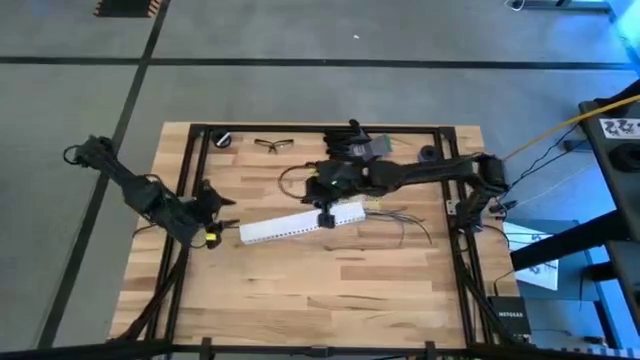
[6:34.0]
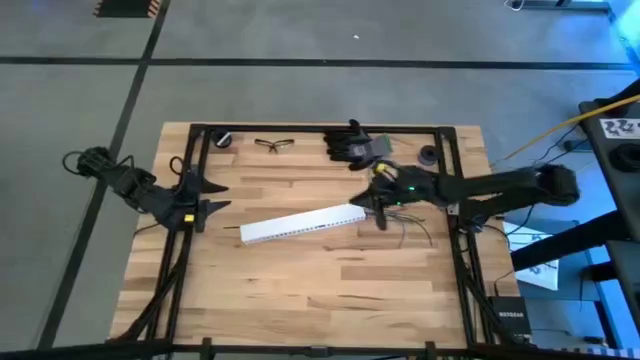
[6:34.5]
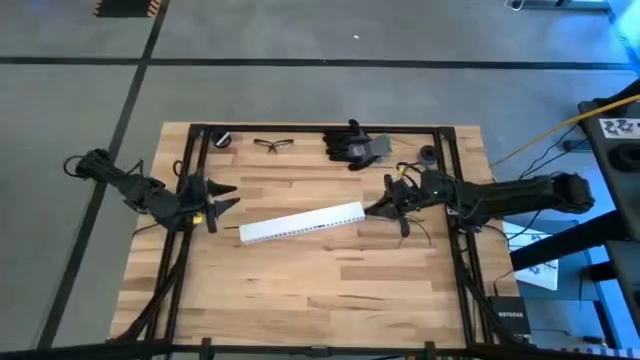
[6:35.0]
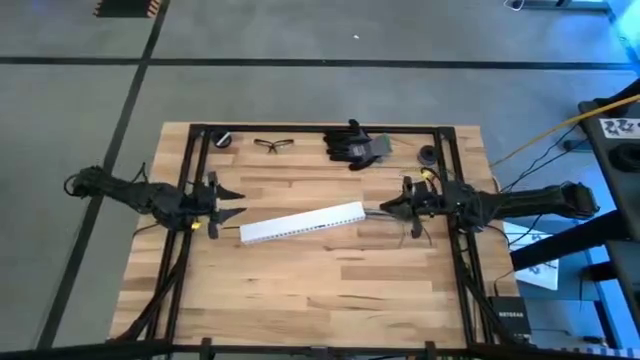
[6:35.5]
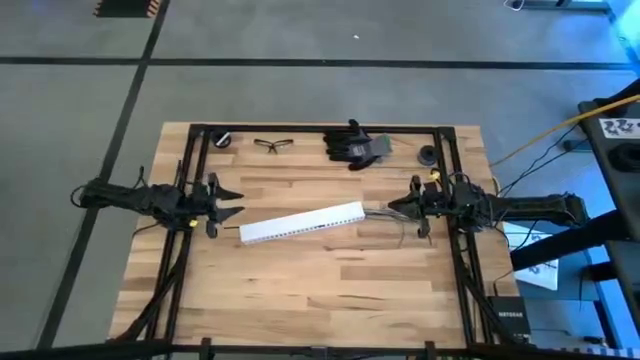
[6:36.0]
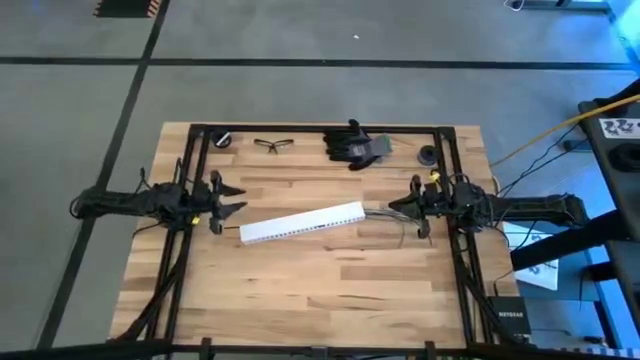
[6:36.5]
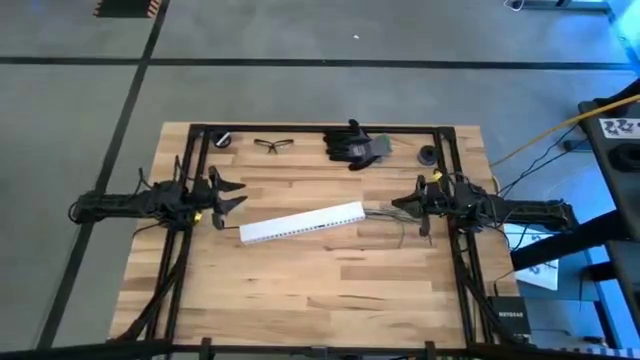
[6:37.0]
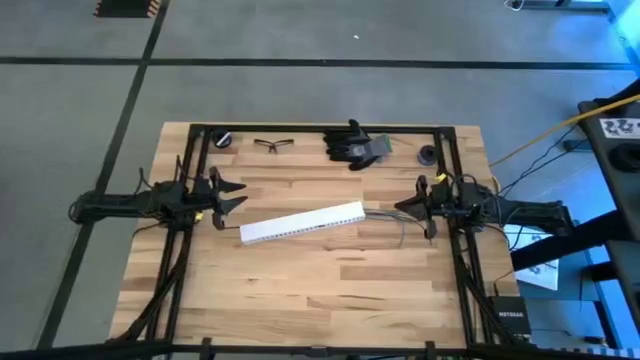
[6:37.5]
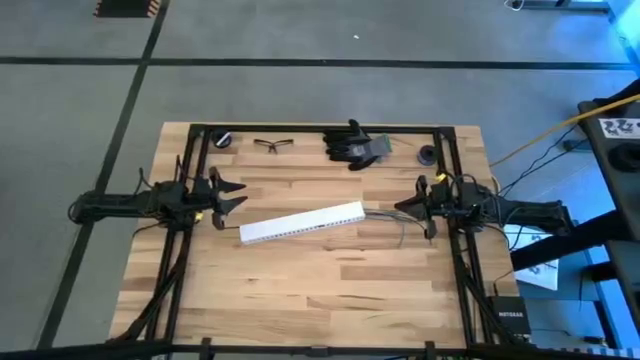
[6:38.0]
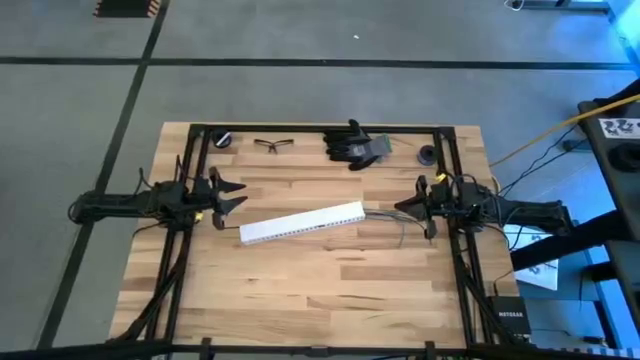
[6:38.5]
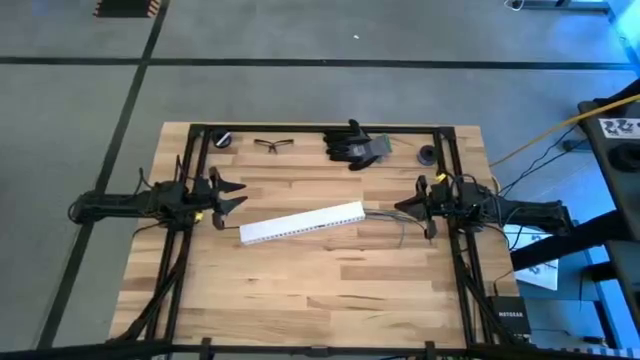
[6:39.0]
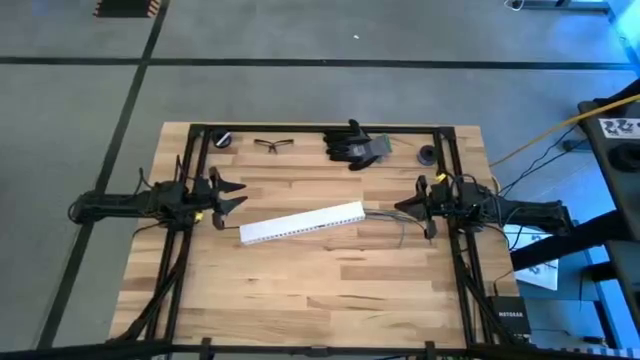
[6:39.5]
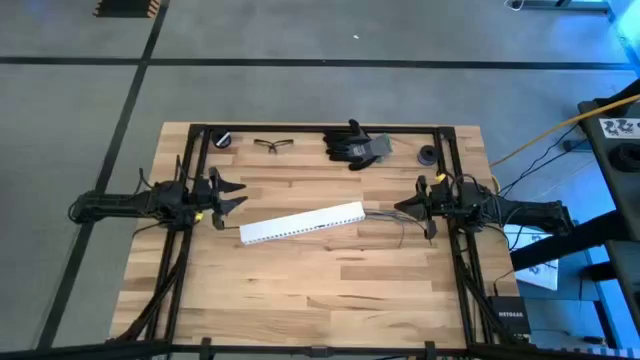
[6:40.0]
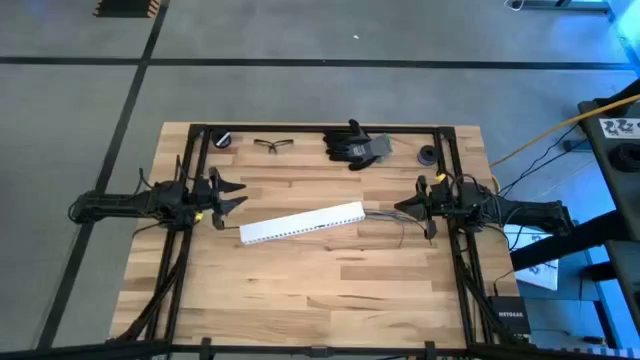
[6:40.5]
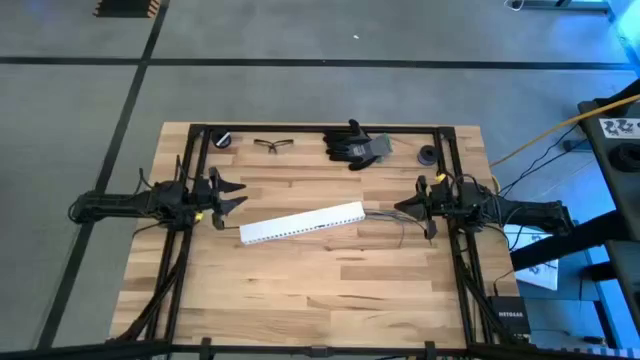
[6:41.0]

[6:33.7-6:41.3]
Task: Ziptie cables
Return to Home Position

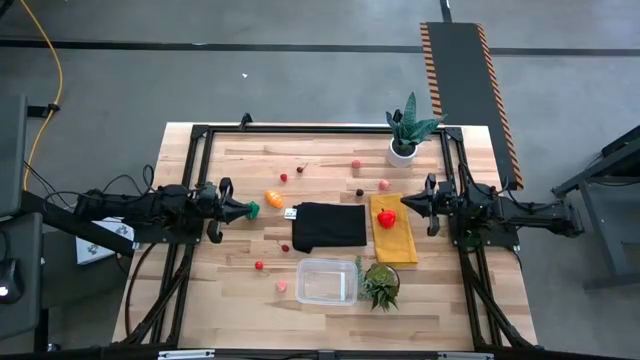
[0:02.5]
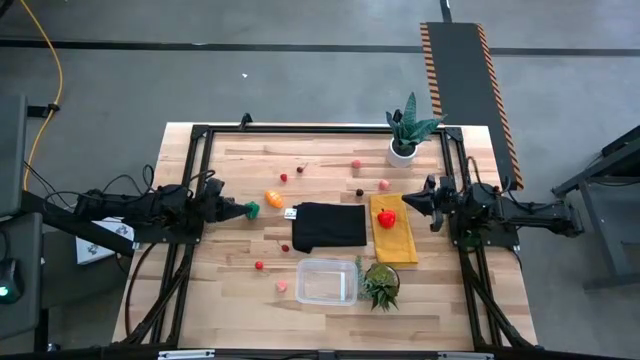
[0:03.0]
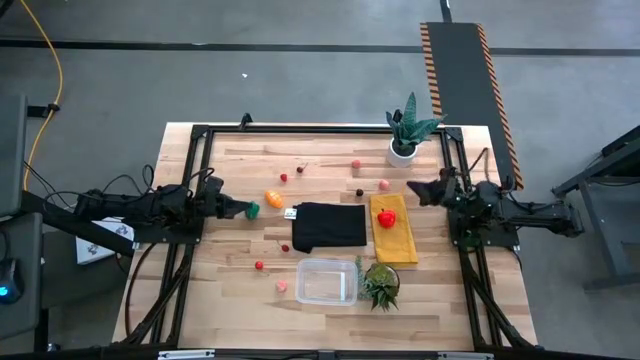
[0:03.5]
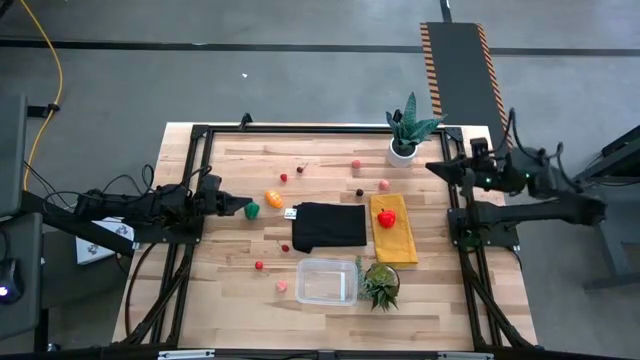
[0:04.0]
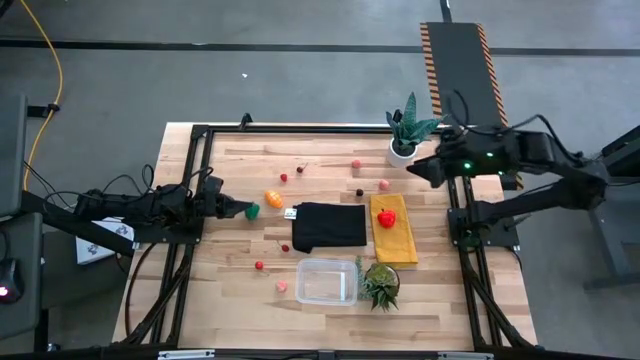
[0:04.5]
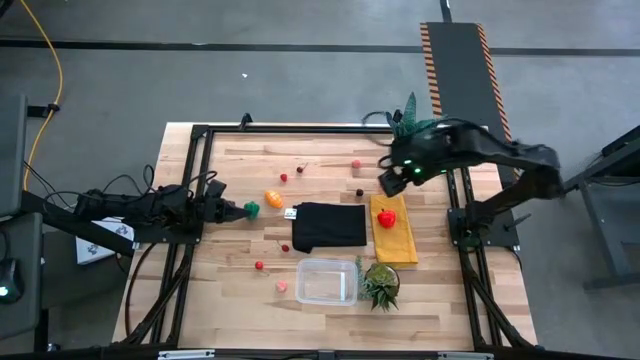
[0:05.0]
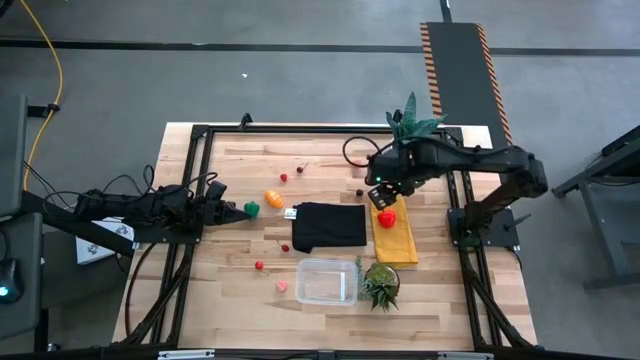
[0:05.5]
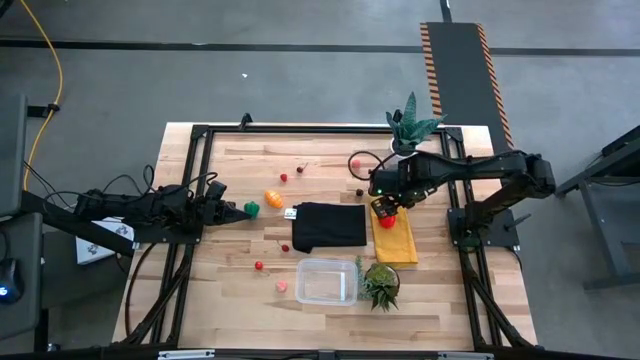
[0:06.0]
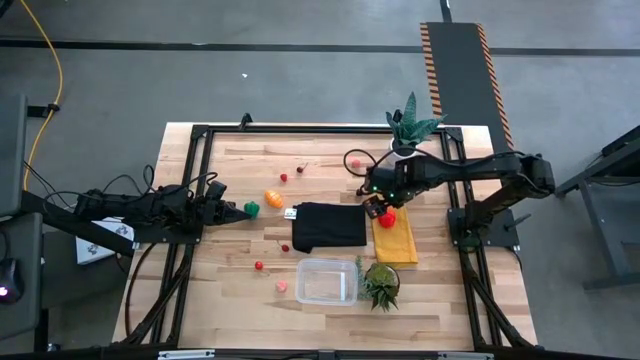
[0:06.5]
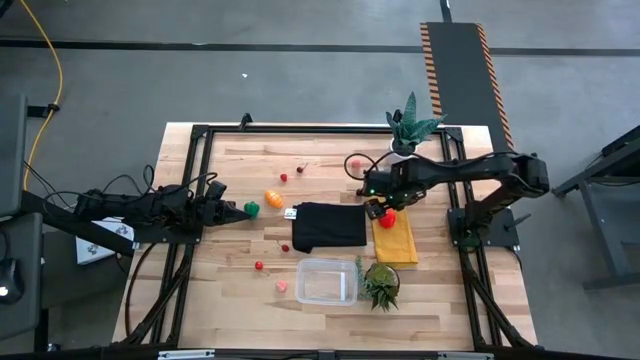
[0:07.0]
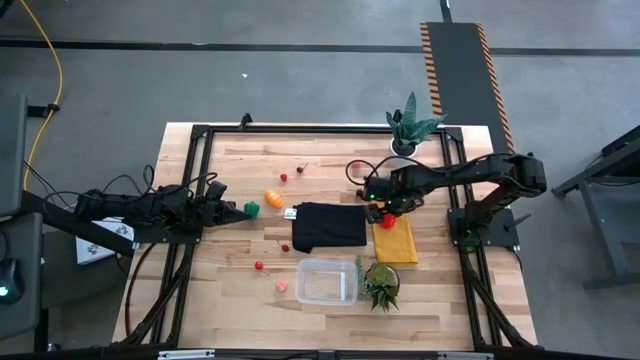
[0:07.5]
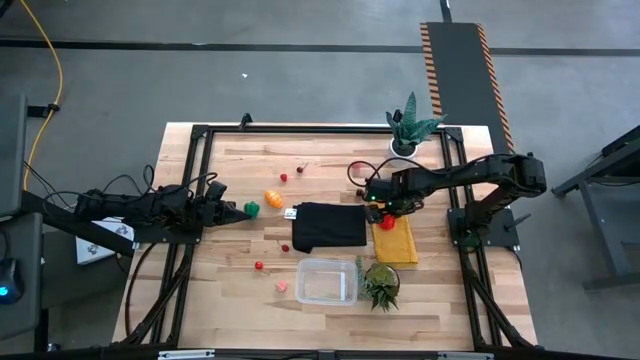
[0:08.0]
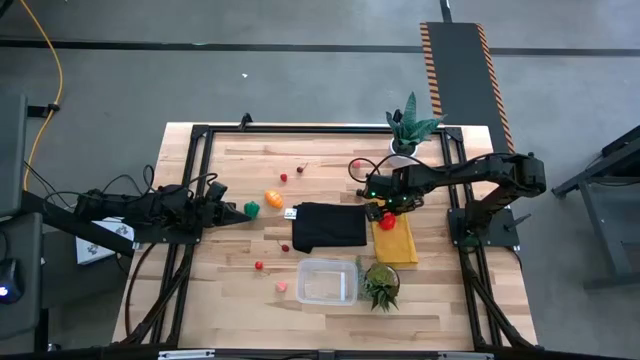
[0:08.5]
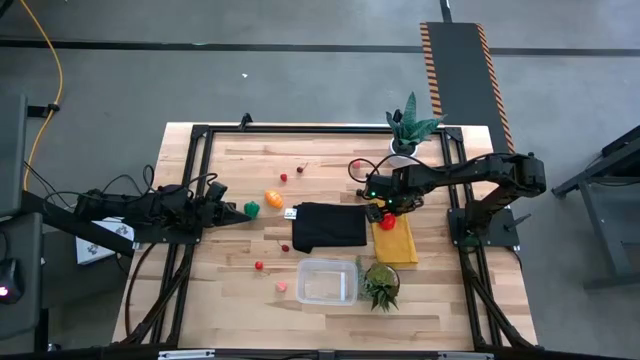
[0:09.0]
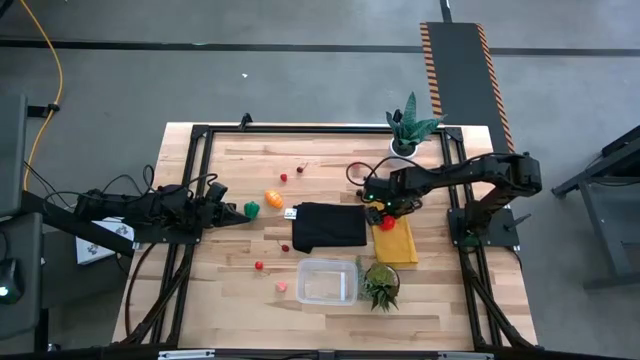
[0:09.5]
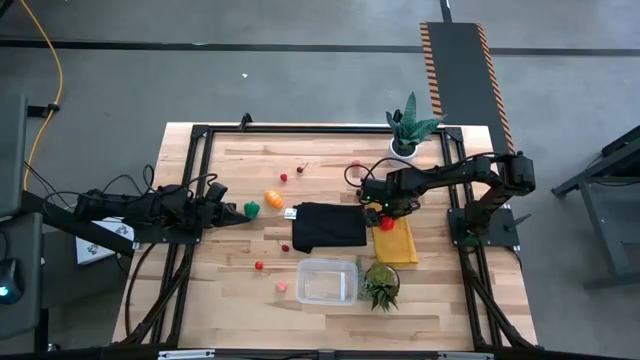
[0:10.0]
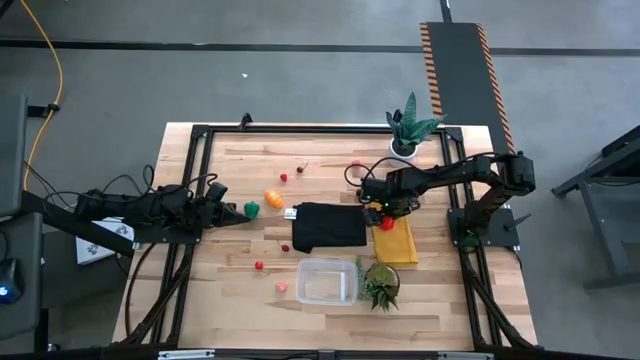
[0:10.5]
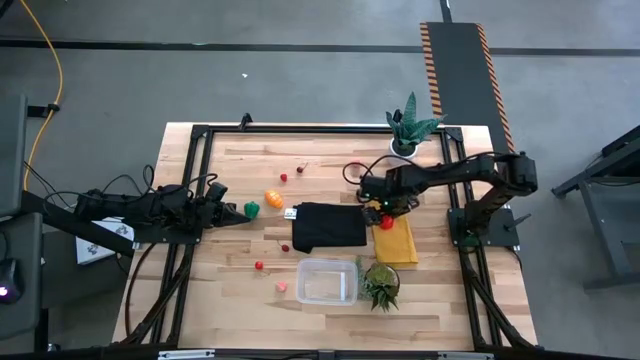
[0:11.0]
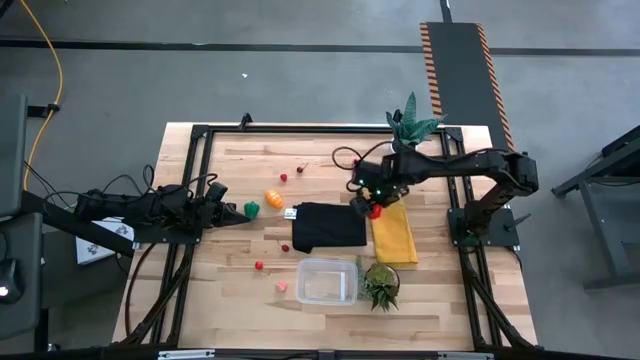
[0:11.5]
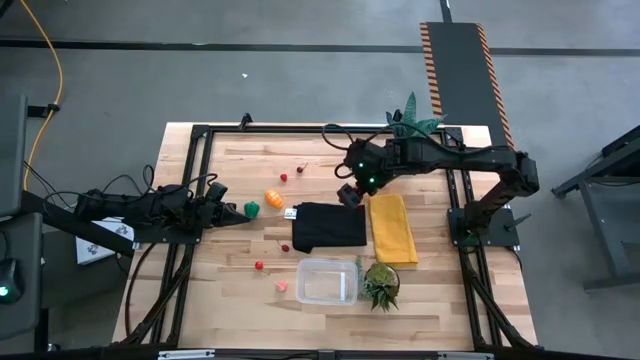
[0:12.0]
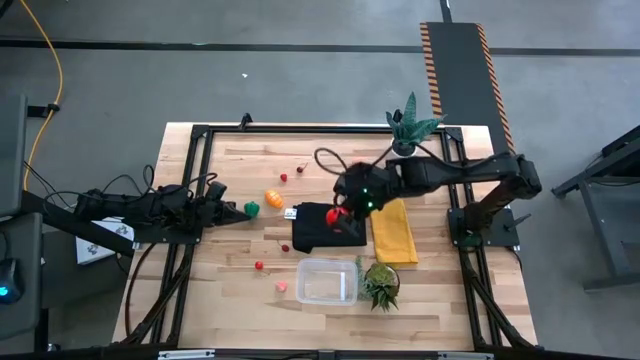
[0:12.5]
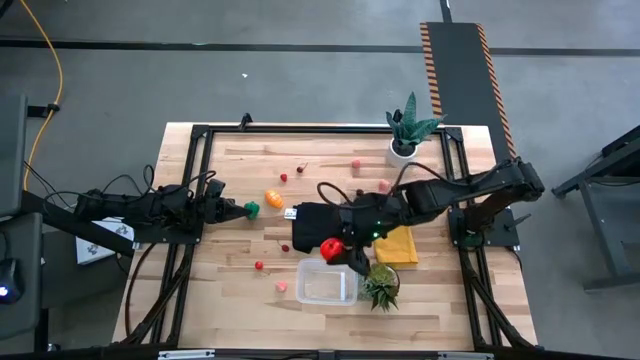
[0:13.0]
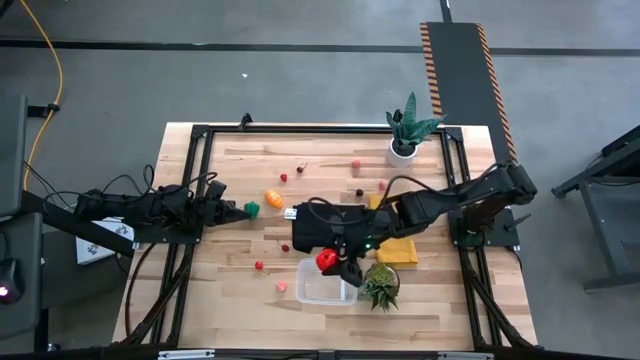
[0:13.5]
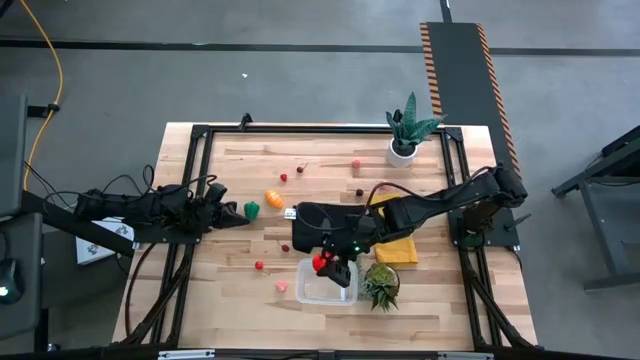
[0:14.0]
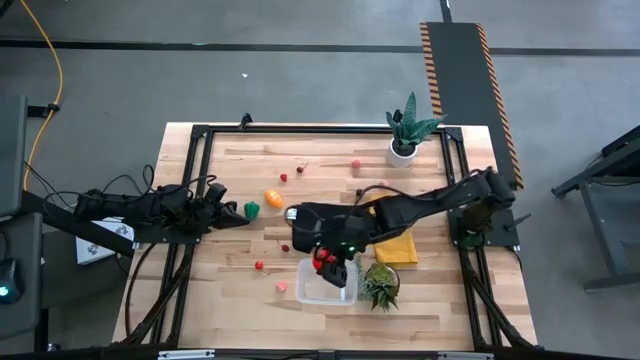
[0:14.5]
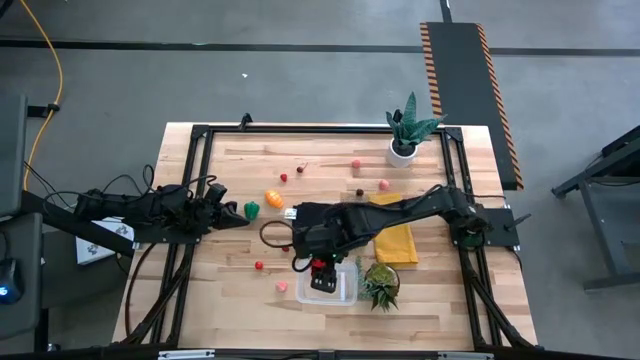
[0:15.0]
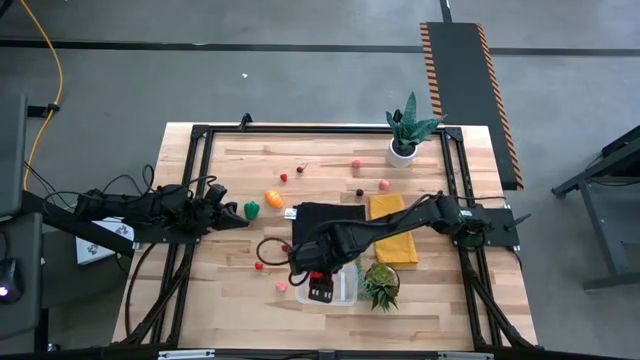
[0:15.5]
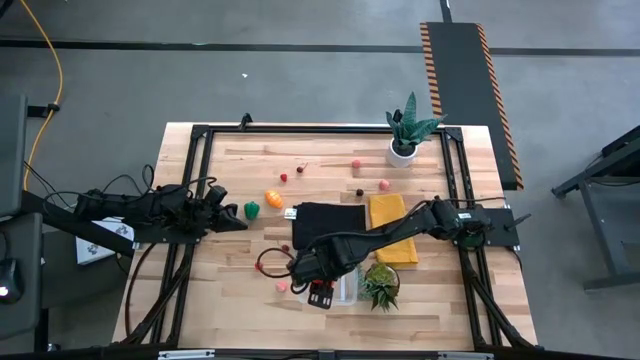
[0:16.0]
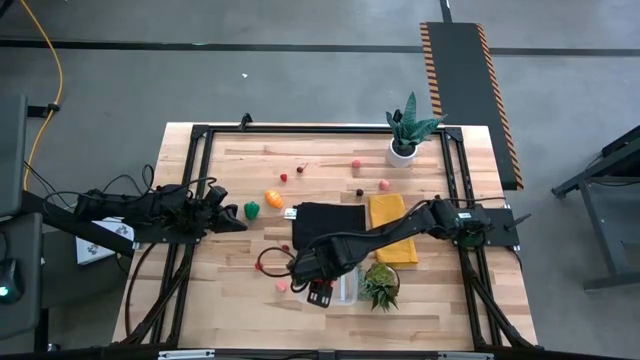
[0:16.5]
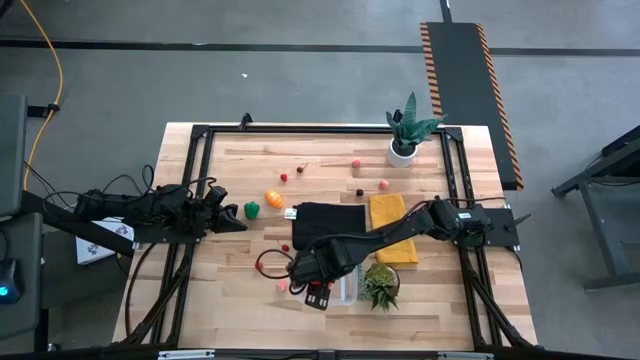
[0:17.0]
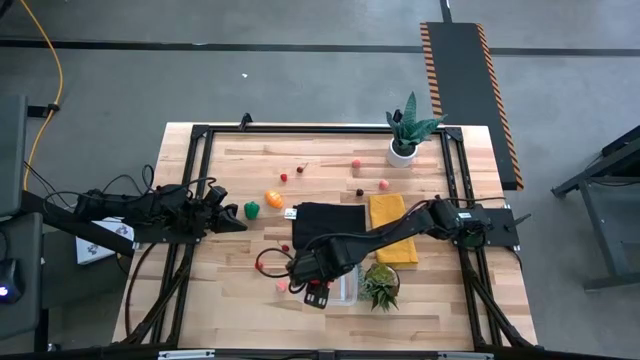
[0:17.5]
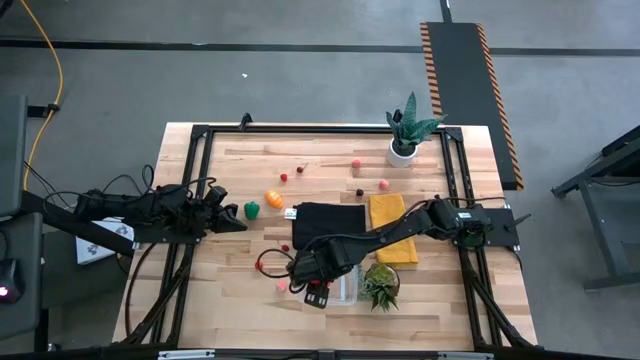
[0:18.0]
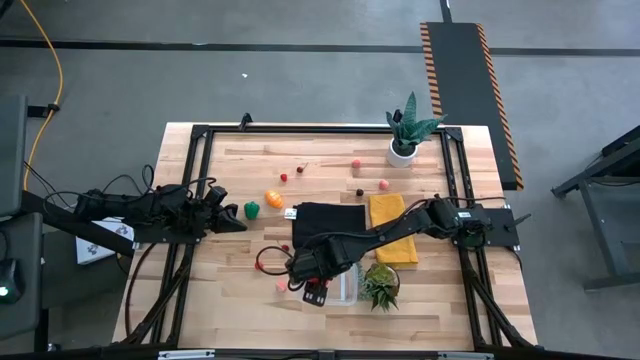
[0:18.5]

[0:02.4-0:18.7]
Task: Pick and placing Produce into tupperware
Put the apple into the transparent bin
